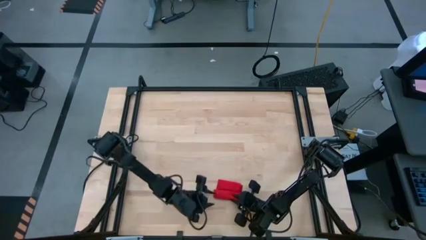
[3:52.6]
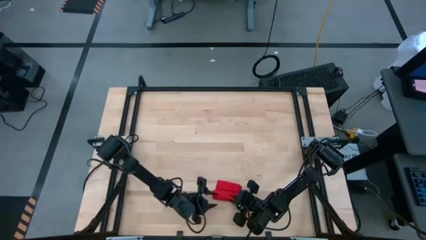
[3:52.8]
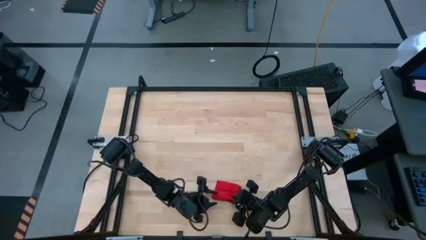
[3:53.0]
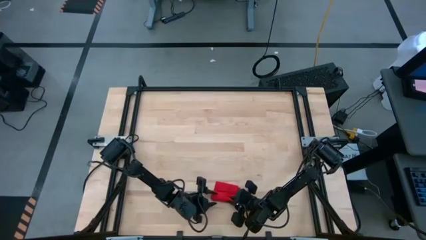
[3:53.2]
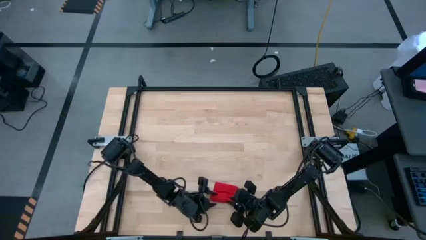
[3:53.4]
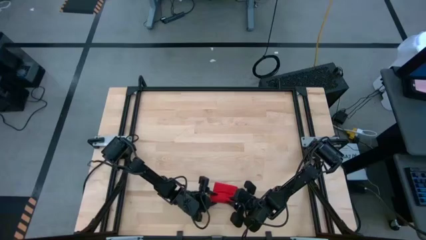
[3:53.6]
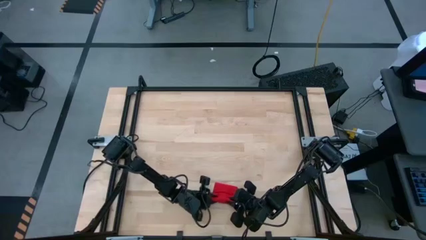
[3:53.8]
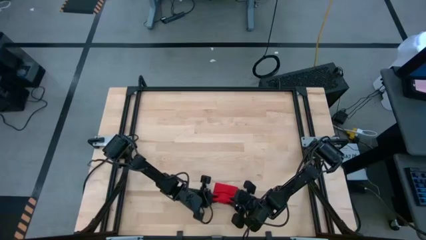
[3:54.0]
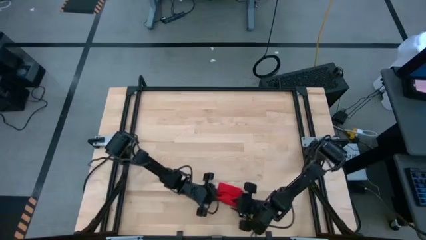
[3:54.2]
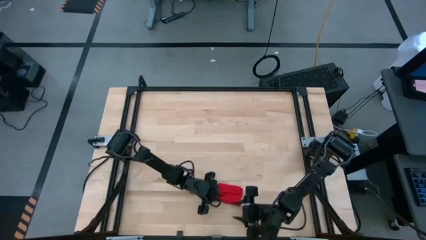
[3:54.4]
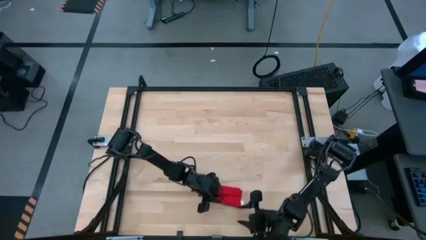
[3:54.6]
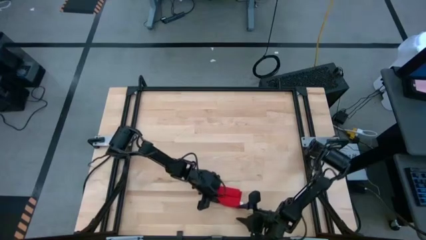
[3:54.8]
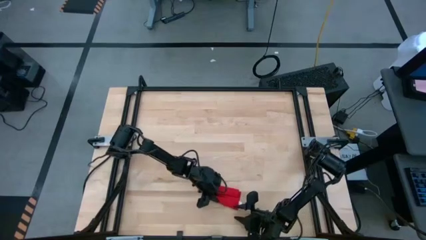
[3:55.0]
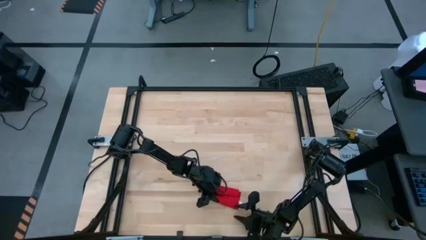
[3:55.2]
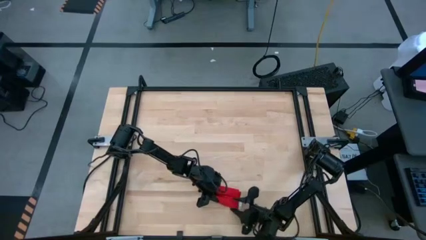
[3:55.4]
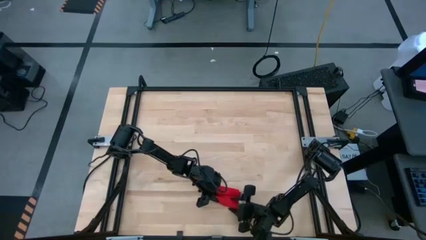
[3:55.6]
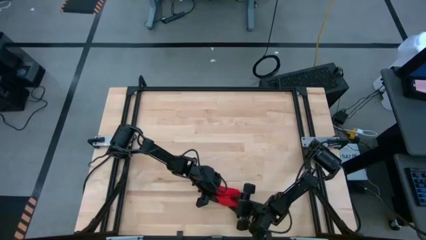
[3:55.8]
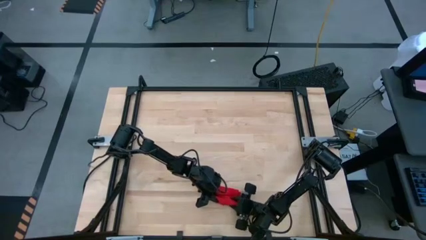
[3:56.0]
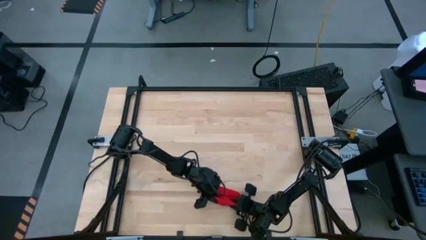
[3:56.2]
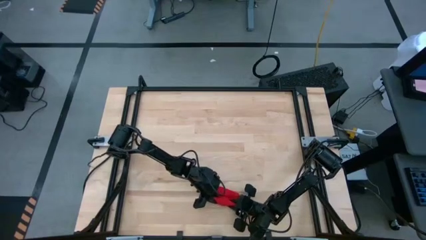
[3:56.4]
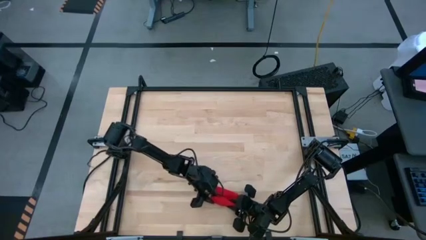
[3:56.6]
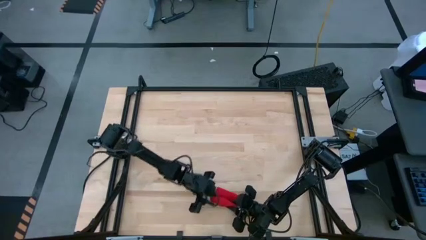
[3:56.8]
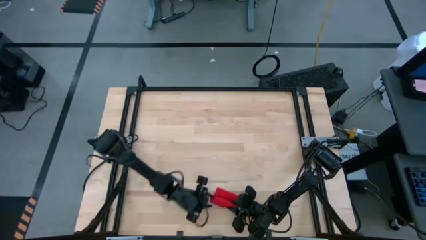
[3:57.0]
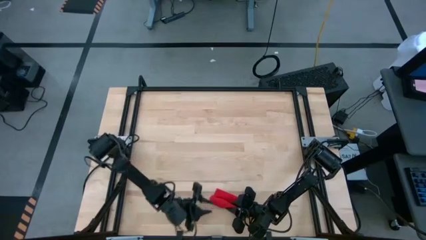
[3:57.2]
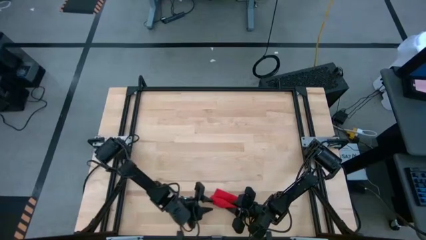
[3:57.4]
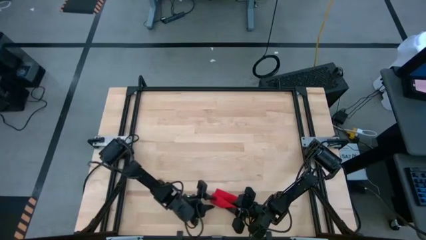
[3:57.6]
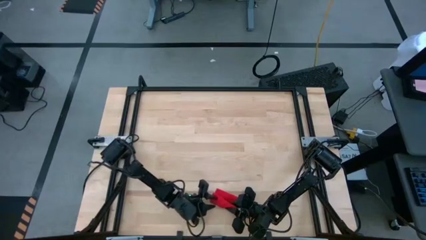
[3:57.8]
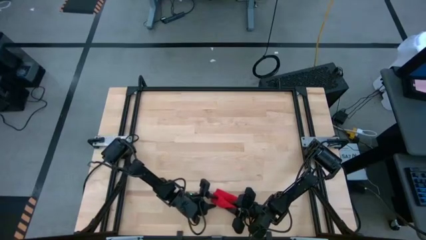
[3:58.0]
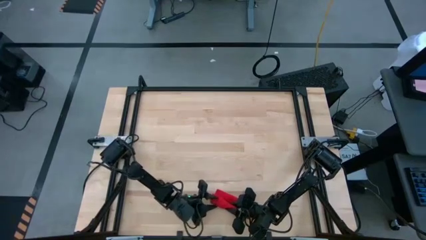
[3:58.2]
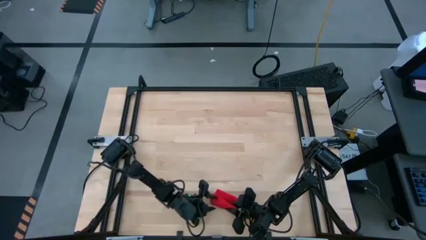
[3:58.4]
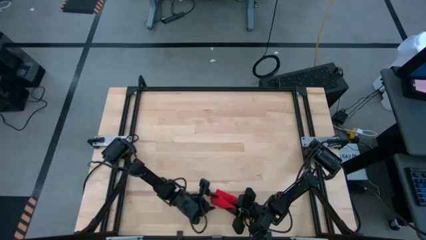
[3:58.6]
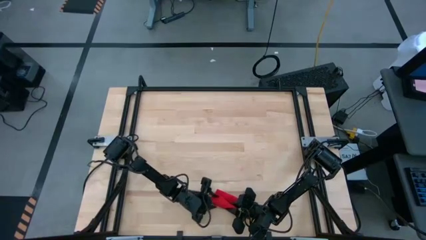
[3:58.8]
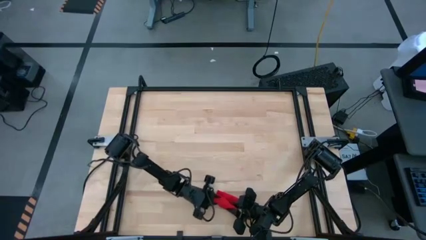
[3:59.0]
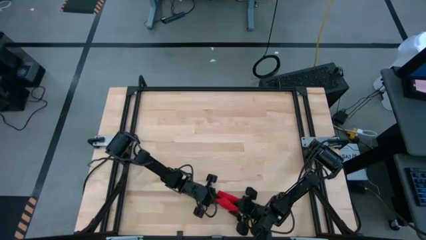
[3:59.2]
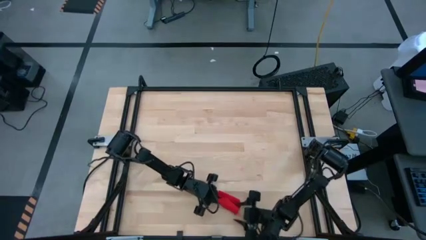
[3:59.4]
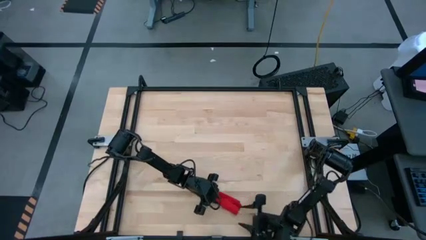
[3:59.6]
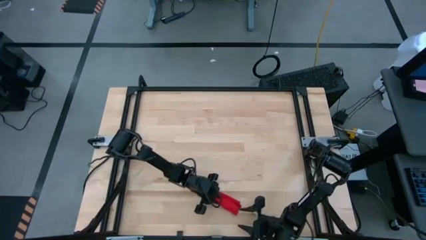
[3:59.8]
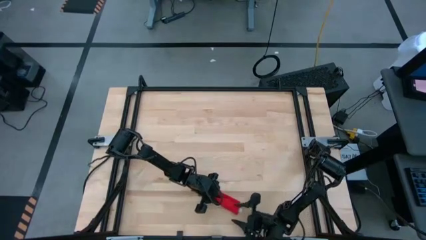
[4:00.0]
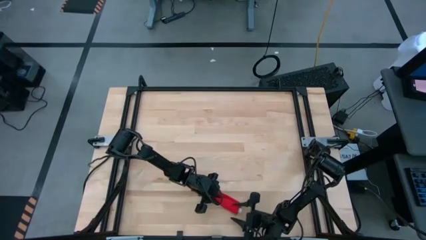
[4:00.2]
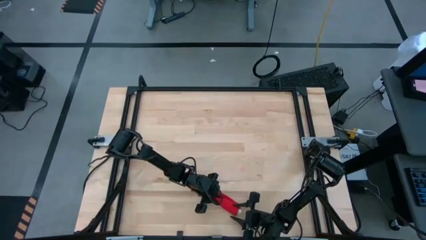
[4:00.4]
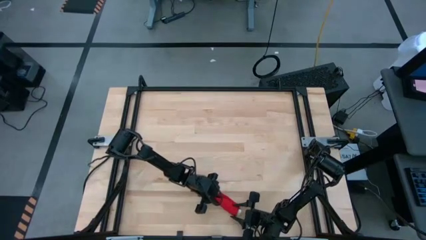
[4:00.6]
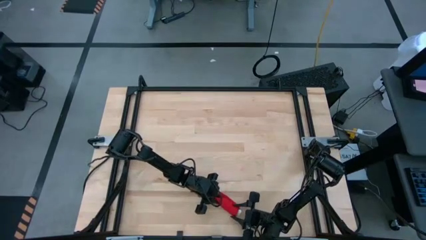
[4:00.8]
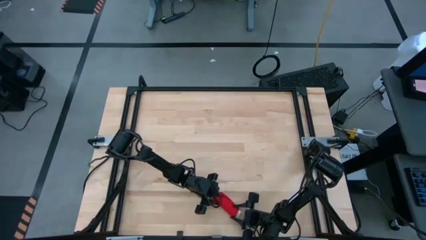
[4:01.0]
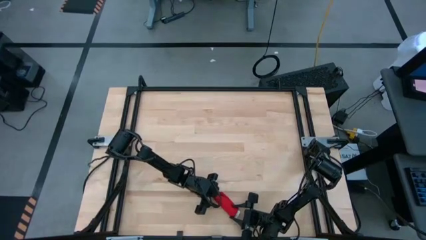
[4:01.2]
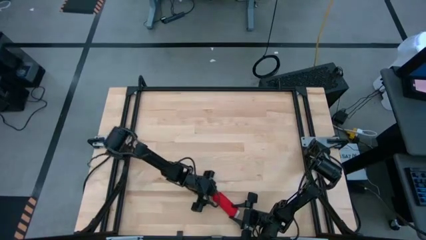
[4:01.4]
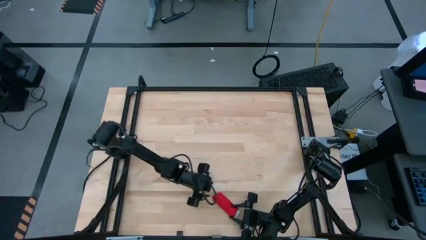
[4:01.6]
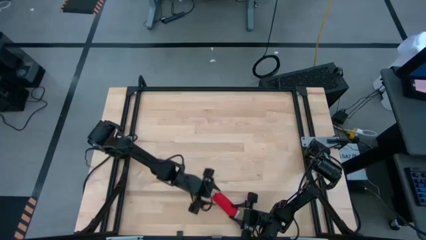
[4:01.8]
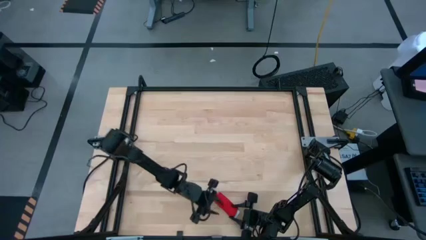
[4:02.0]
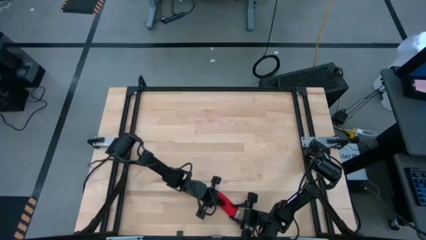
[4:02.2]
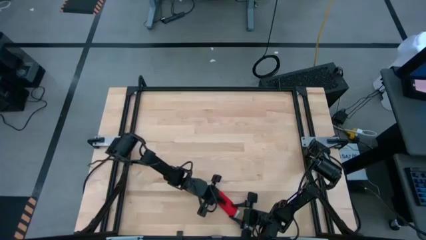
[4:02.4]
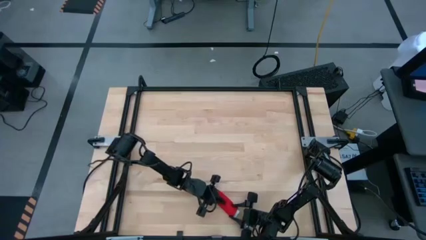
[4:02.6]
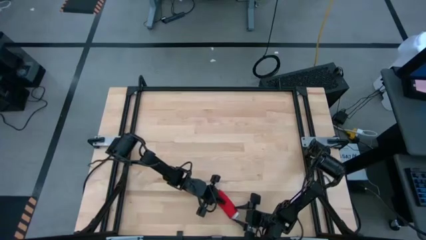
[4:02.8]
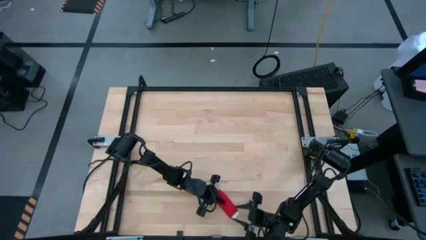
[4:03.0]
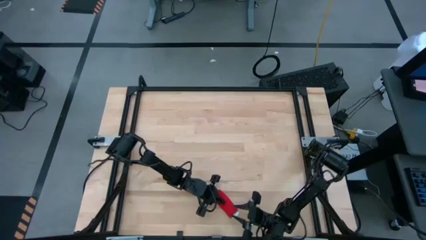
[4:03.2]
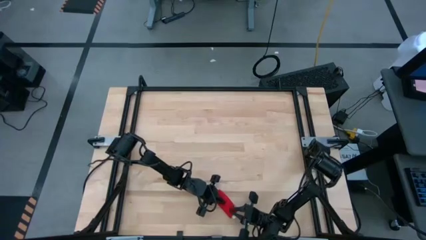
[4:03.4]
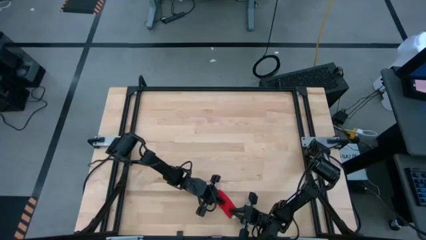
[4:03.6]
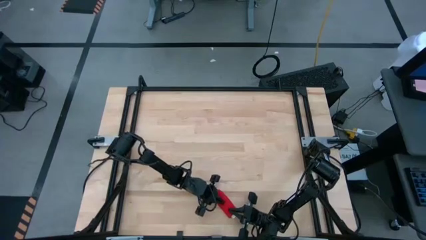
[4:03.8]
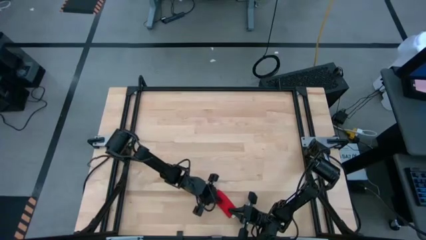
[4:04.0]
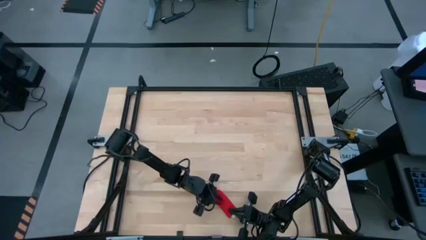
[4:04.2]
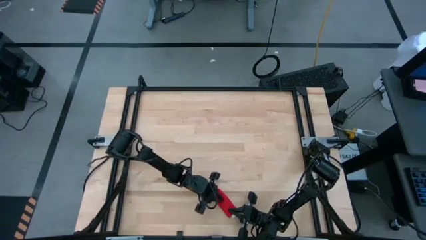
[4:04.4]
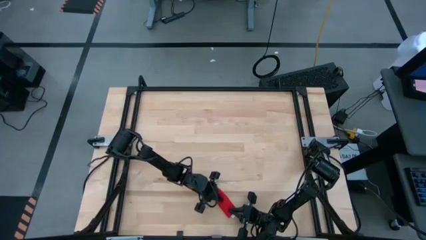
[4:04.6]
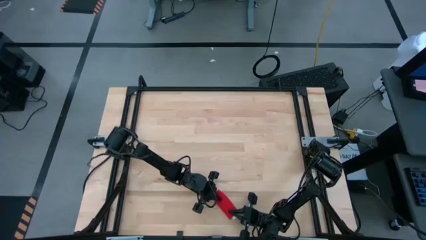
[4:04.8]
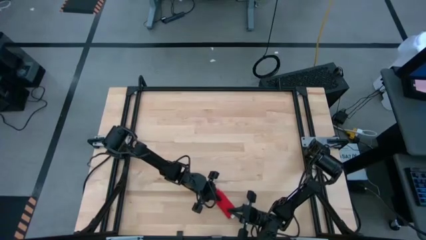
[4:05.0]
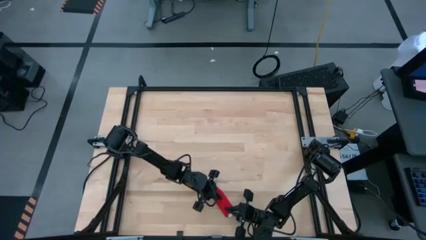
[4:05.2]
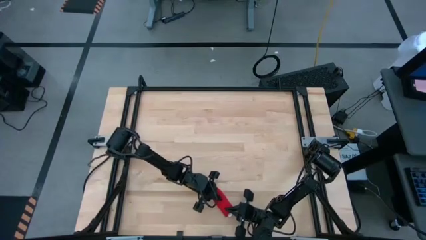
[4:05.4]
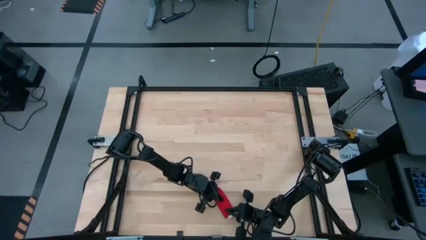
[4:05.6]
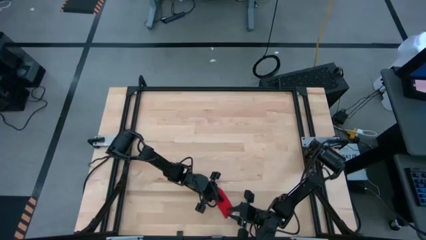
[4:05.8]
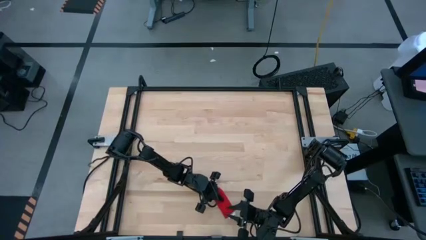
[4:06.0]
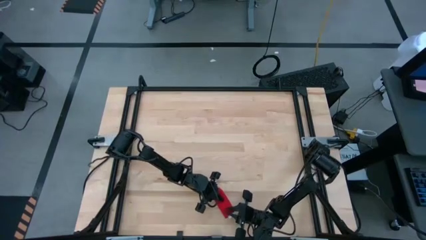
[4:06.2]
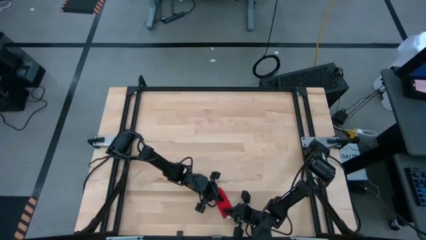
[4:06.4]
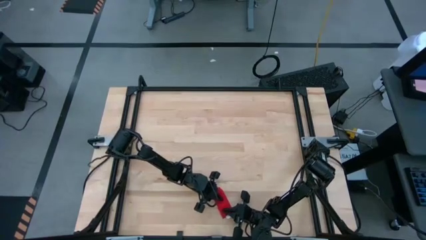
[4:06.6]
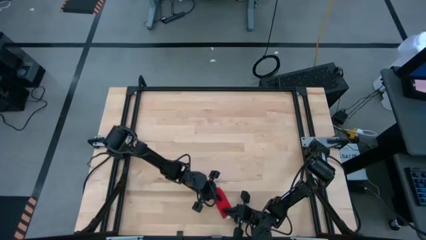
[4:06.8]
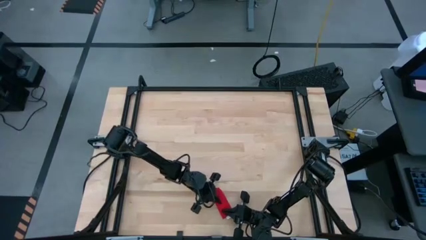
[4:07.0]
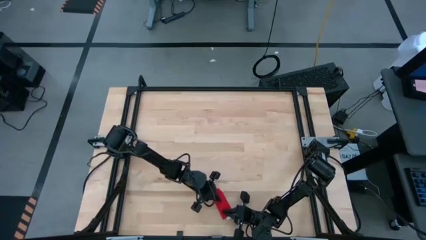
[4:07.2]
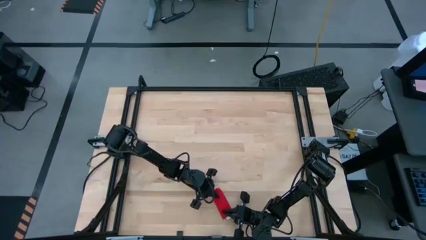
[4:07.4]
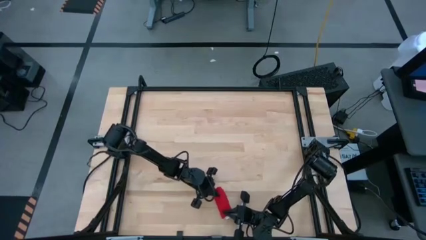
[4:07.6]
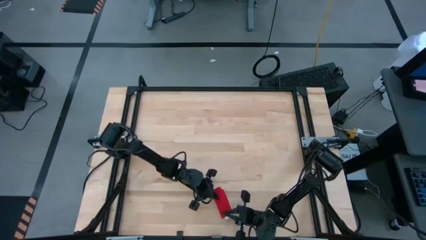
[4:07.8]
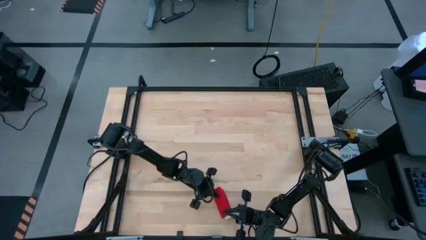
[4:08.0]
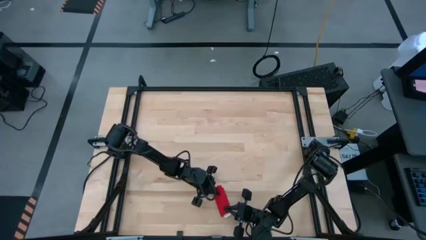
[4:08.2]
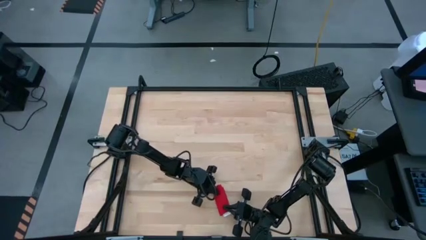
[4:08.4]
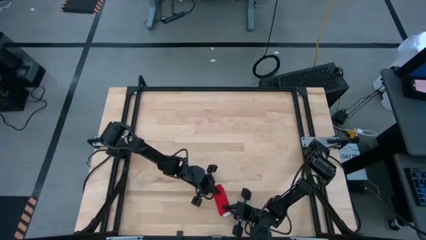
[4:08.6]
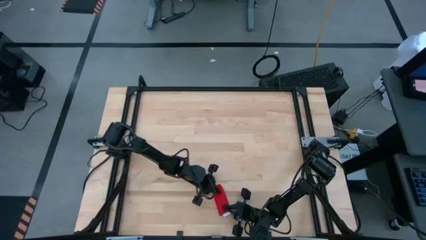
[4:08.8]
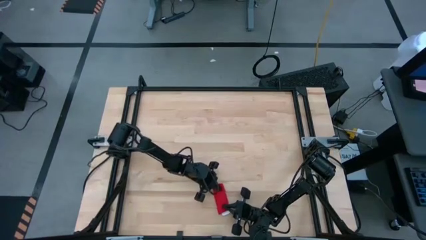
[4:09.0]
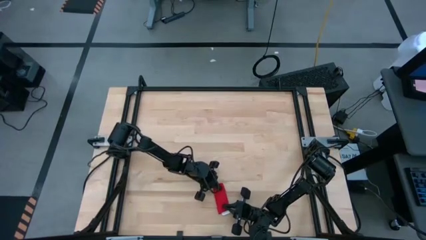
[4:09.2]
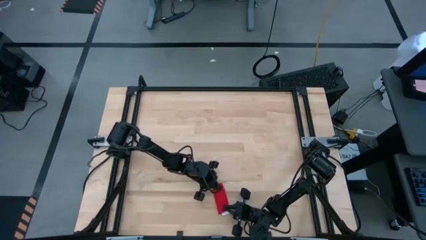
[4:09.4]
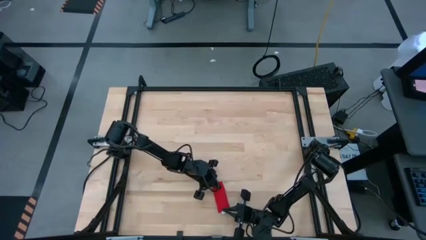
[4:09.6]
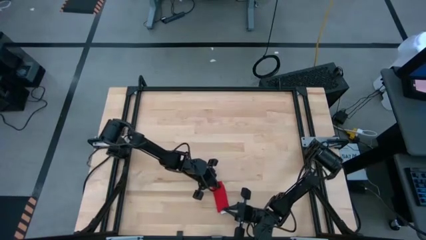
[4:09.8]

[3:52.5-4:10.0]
Task: Roll napkin
Roll the red napkin
